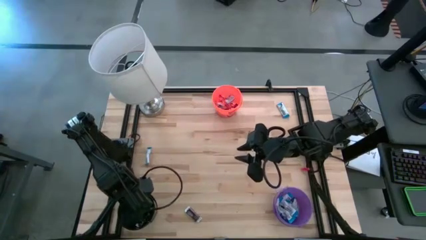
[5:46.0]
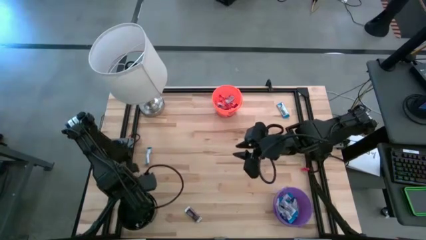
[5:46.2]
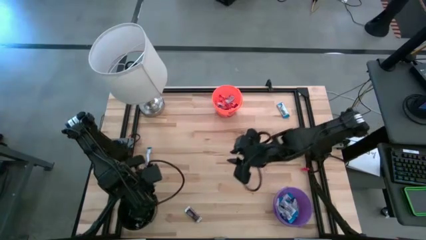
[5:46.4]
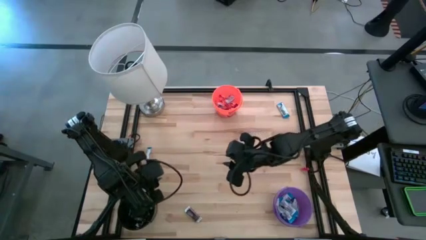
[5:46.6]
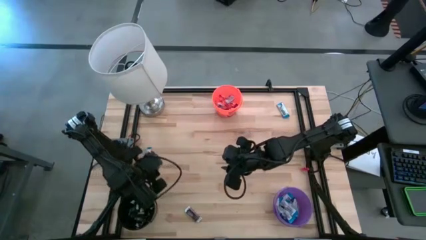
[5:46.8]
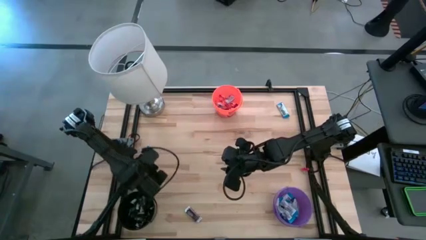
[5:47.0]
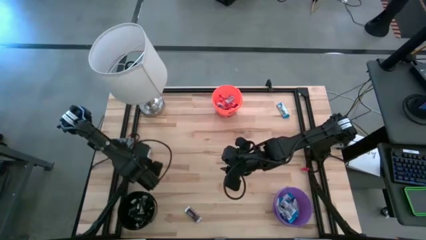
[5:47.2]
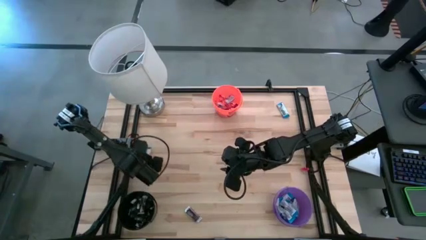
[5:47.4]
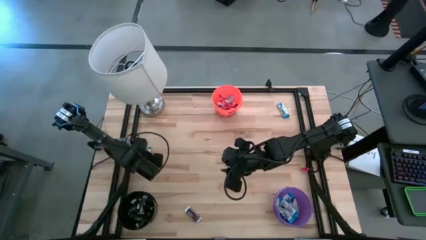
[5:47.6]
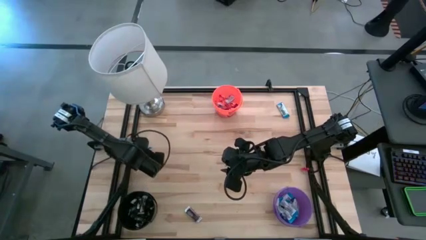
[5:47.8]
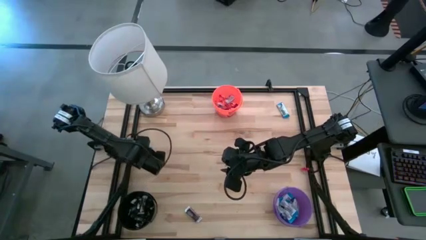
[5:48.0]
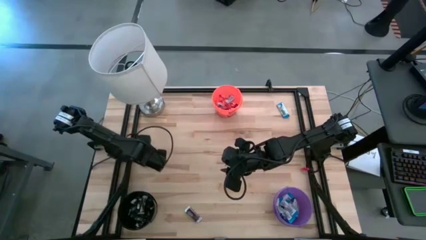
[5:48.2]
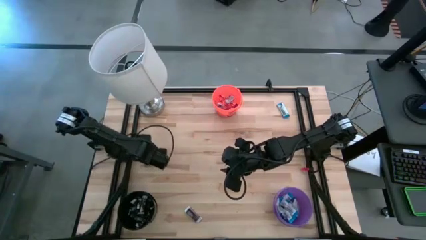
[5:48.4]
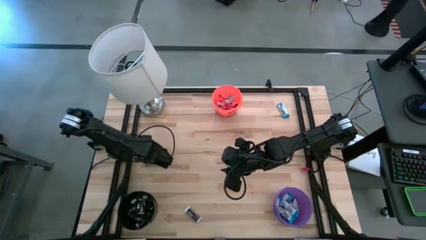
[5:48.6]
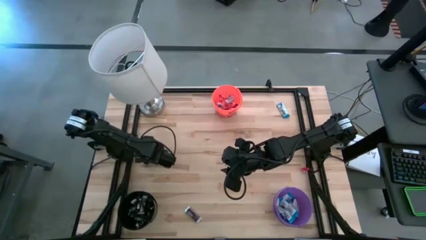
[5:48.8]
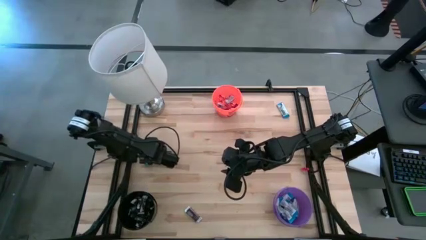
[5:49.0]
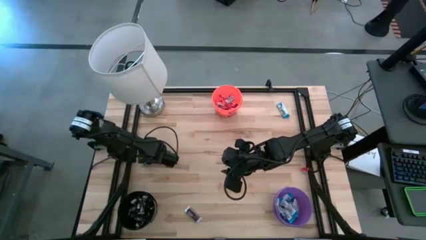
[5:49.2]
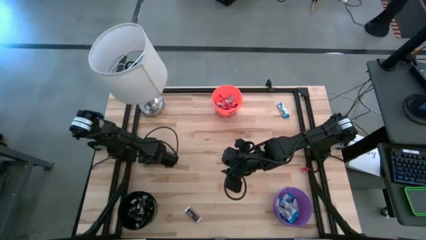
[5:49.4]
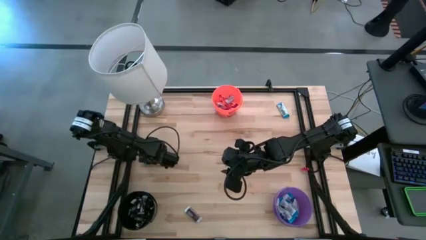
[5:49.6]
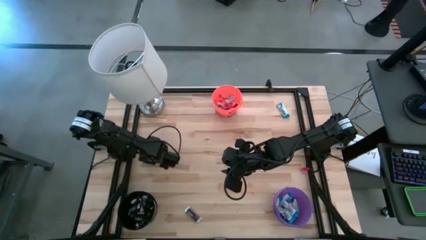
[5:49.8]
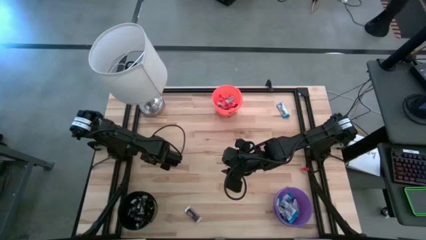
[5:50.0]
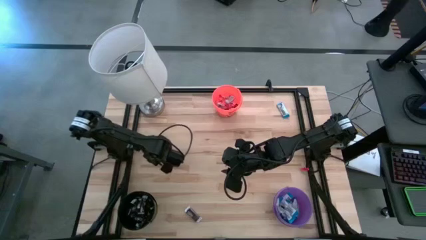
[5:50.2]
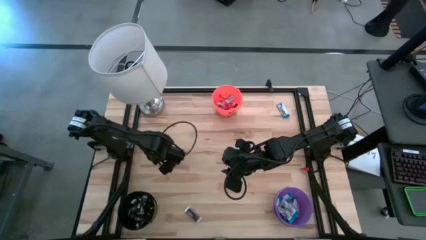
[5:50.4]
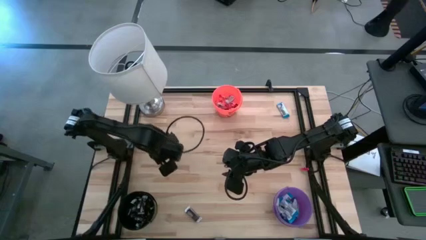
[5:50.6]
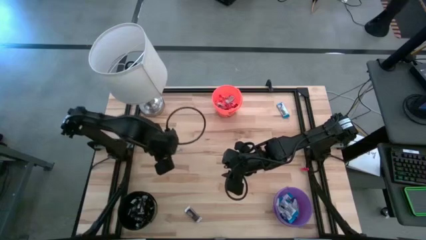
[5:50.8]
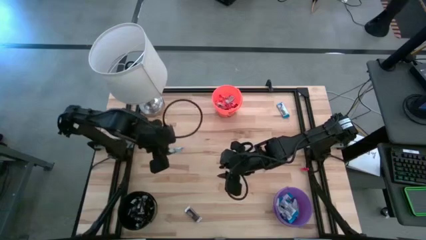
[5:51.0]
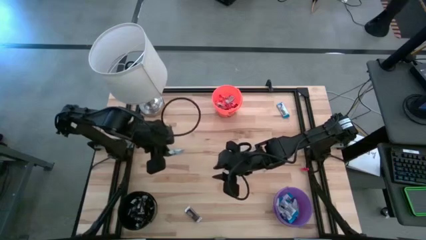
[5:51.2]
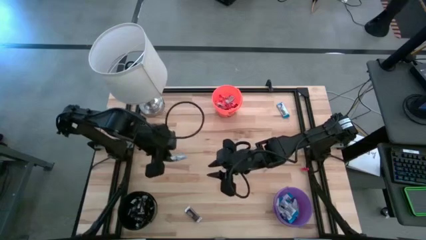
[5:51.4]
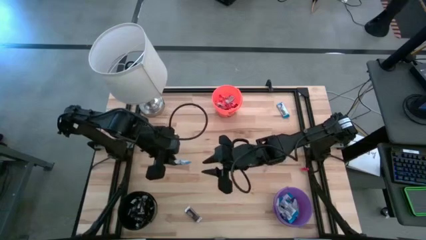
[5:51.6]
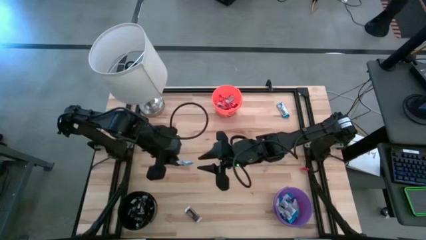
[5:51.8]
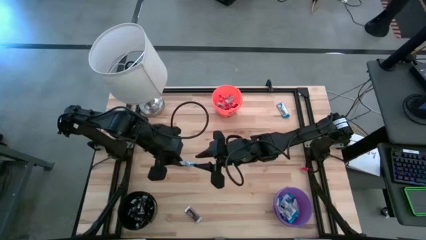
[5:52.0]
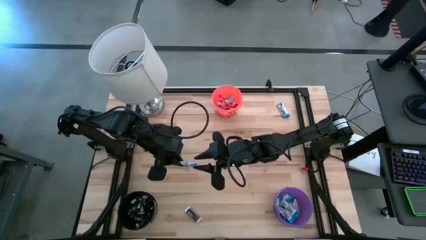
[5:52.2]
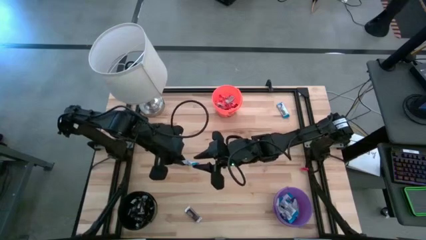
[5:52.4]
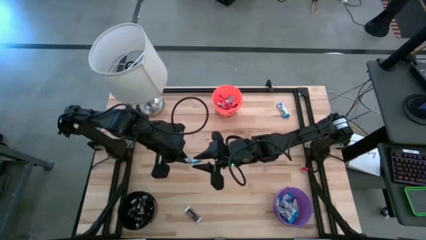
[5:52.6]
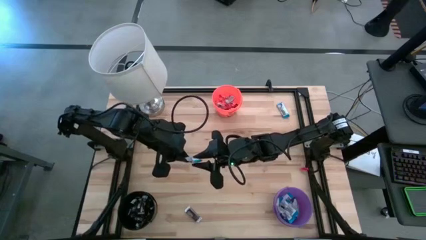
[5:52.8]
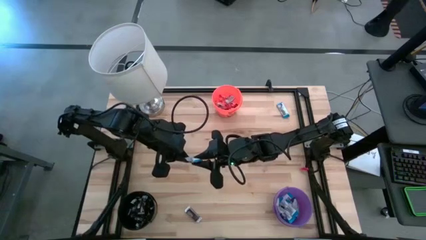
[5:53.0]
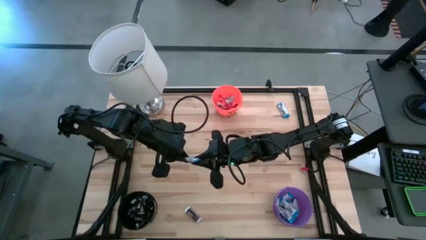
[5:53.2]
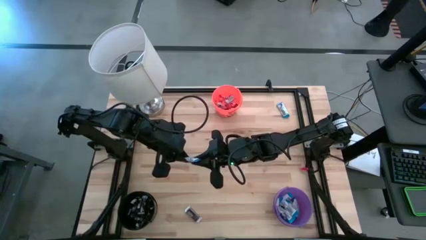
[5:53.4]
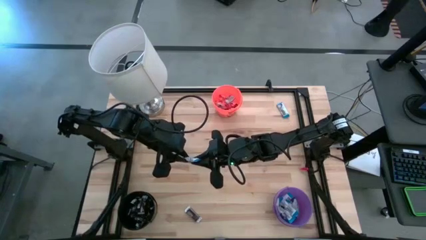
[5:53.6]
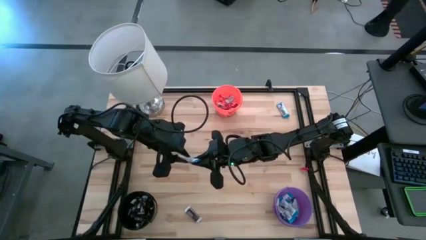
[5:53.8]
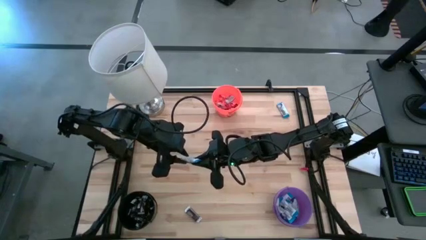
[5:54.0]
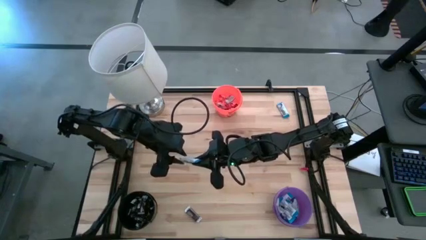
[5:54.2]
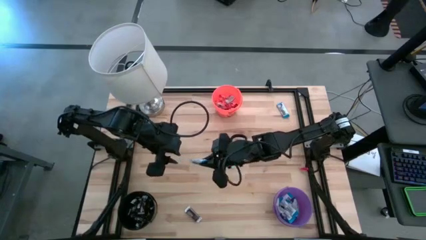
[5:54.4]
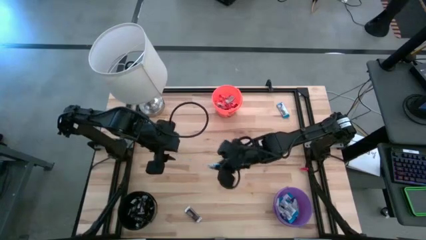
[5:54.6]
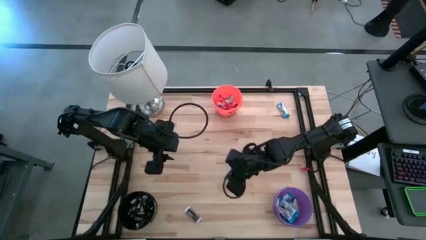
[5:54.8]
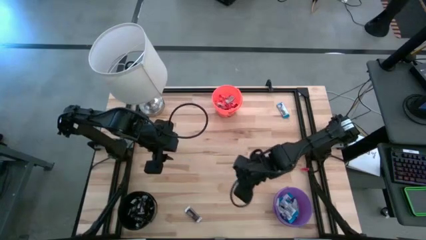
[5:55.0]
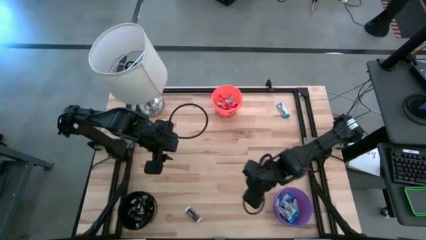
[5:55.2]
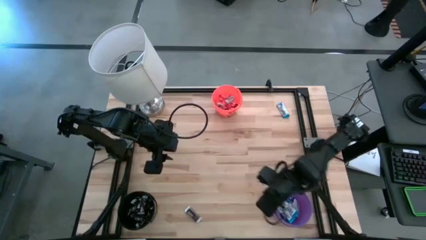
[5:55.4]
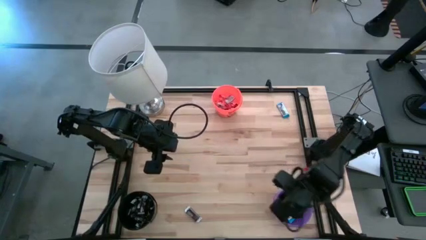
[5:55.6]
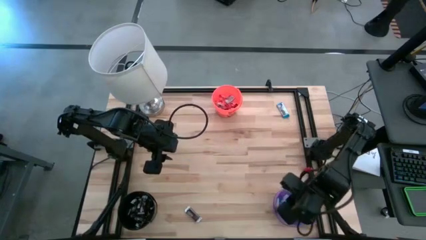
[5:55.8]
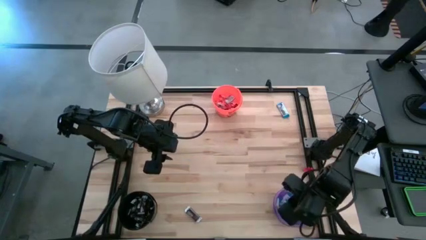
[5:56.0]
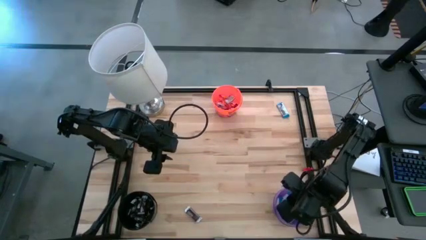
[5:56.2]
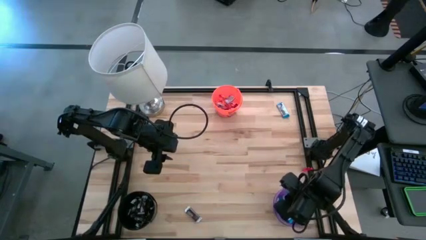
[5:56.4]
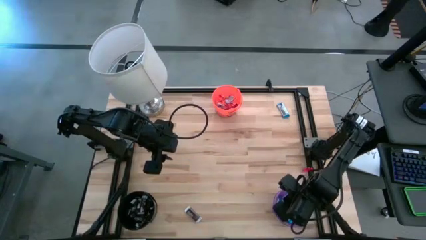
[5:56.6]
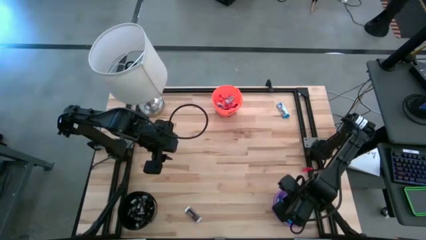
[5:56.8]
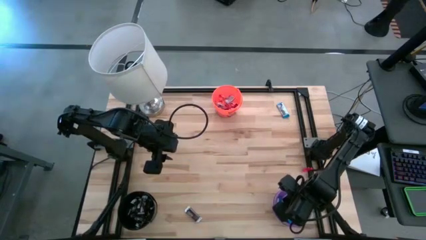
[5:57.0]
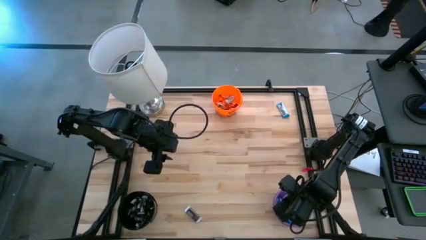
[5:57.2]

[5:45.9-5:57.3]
Task: Organize candy in baskets
Put the white chocolate into the purple bucket
